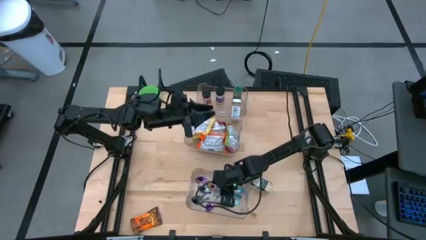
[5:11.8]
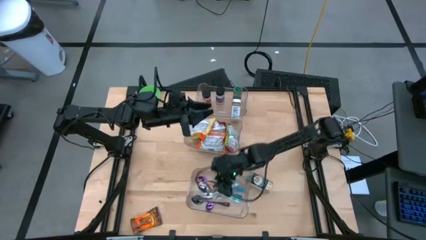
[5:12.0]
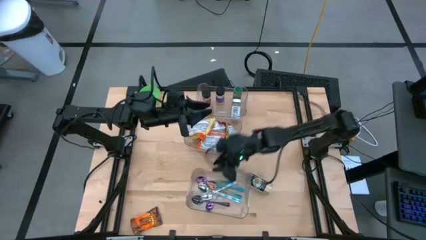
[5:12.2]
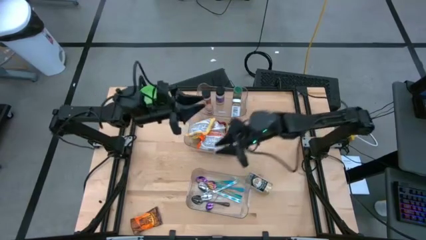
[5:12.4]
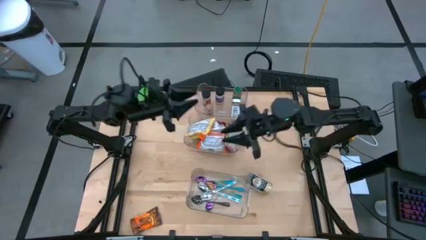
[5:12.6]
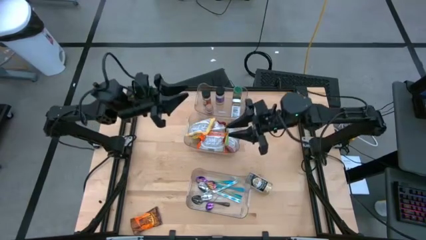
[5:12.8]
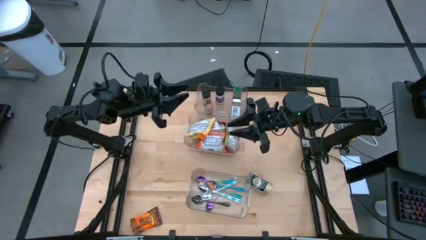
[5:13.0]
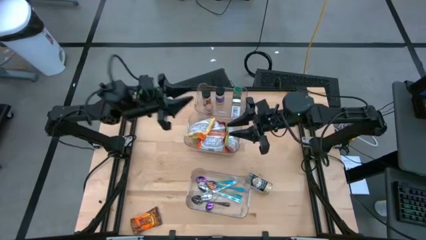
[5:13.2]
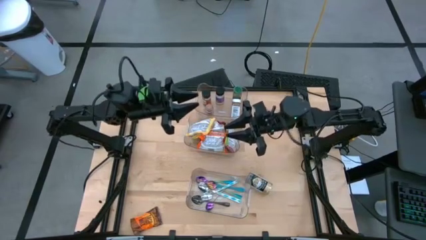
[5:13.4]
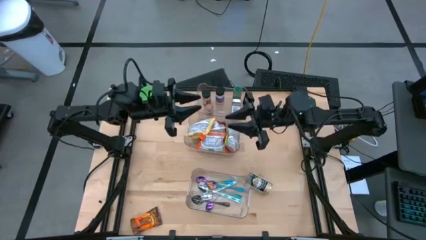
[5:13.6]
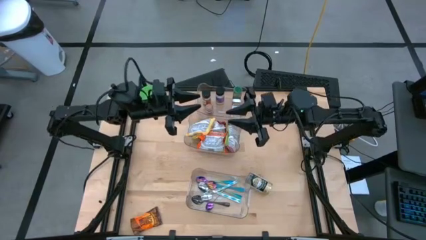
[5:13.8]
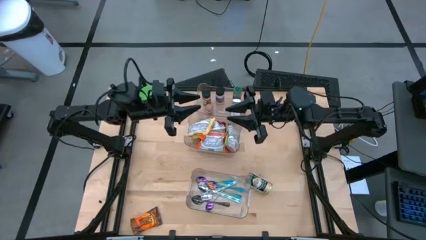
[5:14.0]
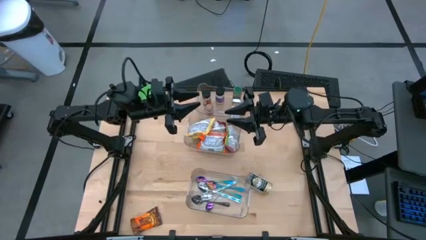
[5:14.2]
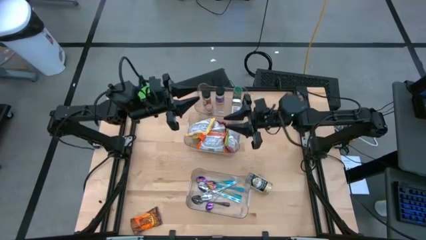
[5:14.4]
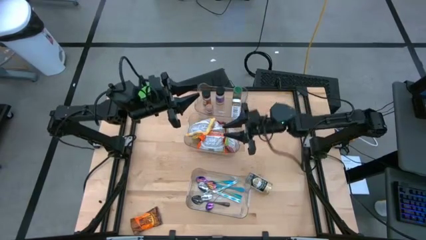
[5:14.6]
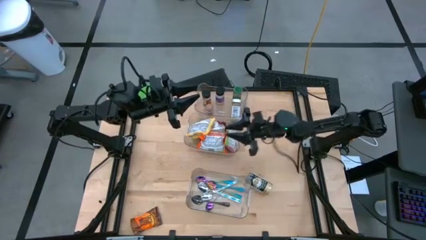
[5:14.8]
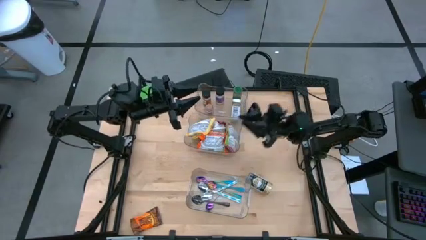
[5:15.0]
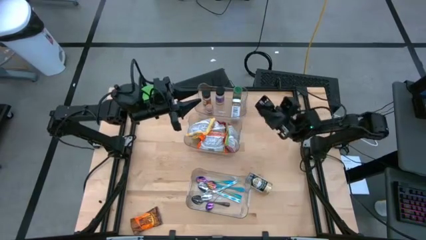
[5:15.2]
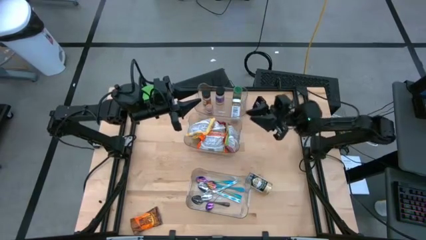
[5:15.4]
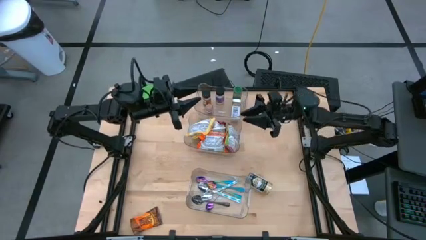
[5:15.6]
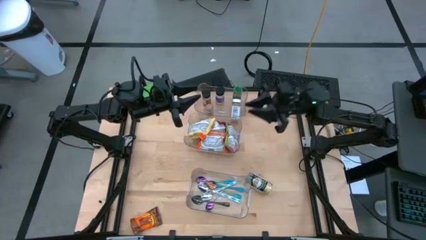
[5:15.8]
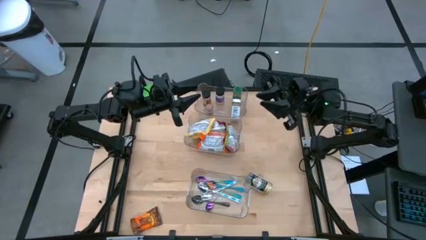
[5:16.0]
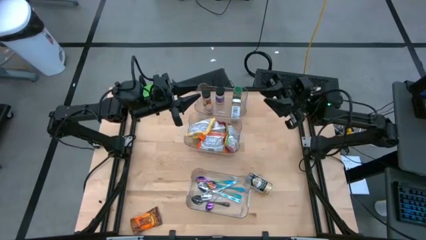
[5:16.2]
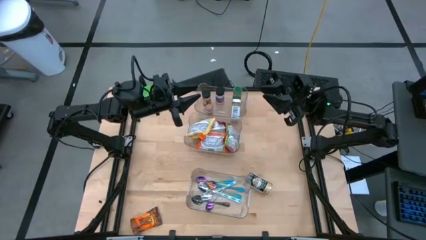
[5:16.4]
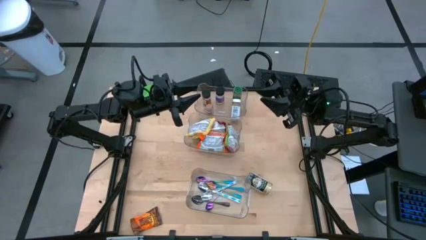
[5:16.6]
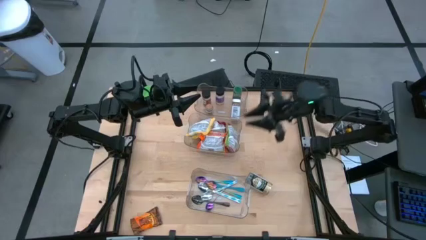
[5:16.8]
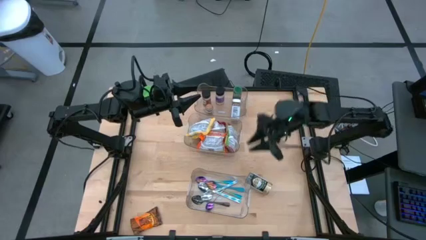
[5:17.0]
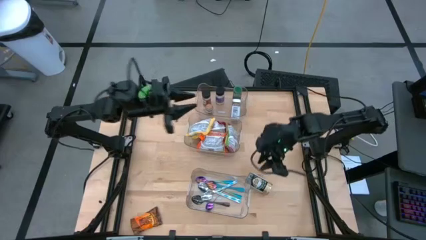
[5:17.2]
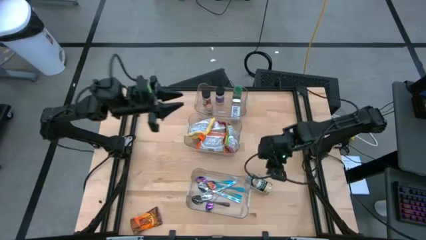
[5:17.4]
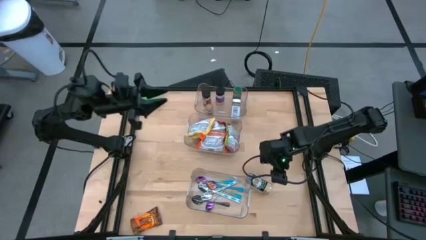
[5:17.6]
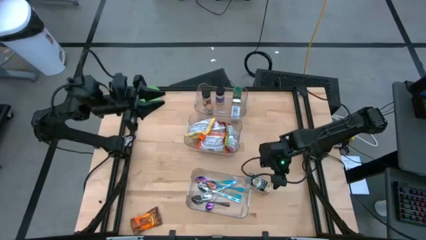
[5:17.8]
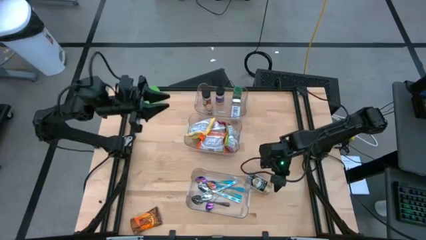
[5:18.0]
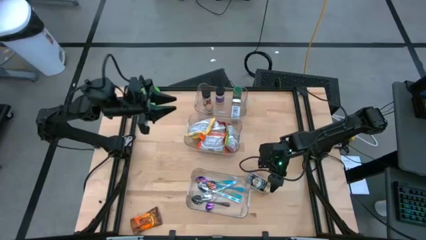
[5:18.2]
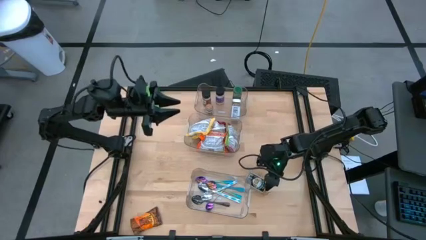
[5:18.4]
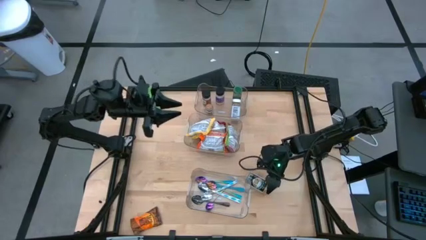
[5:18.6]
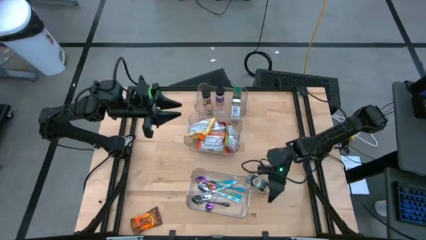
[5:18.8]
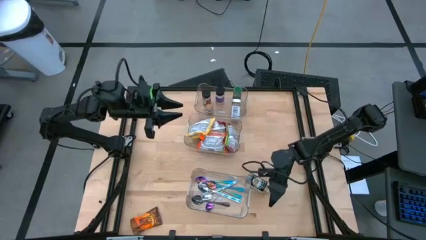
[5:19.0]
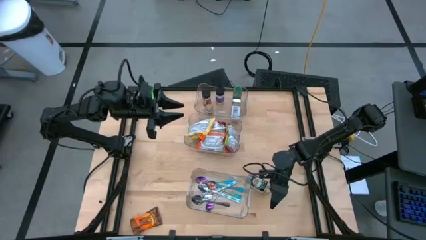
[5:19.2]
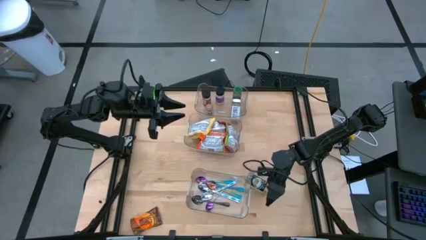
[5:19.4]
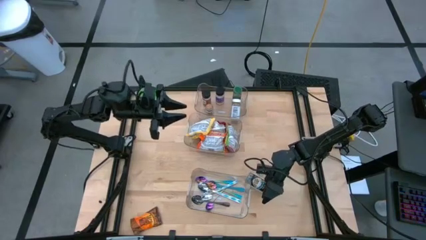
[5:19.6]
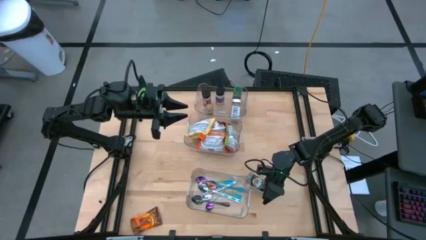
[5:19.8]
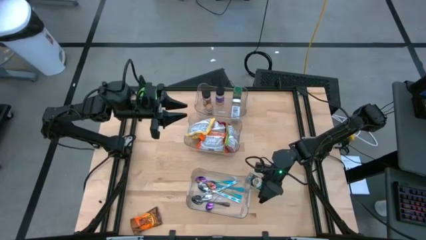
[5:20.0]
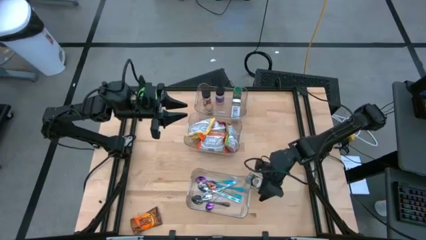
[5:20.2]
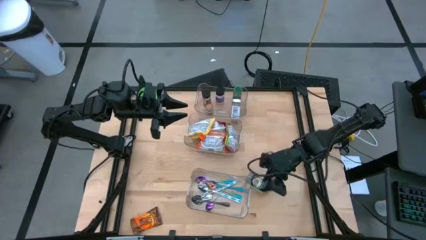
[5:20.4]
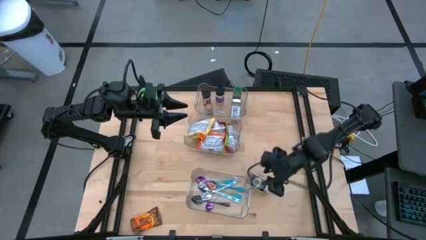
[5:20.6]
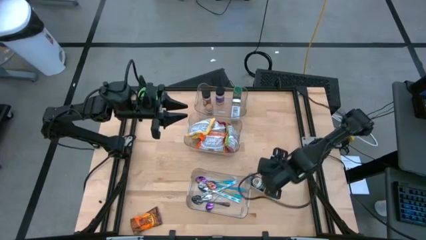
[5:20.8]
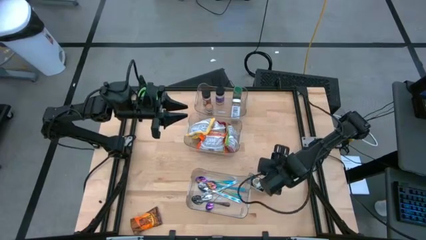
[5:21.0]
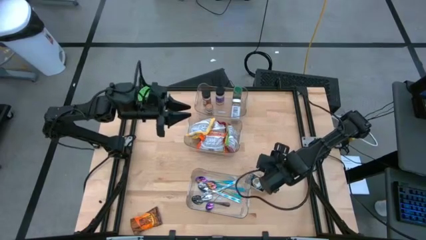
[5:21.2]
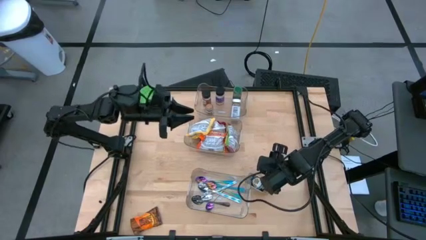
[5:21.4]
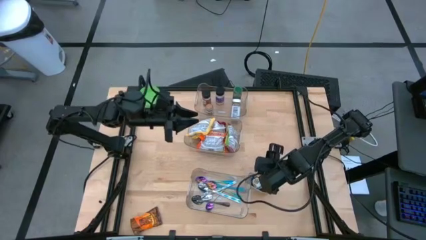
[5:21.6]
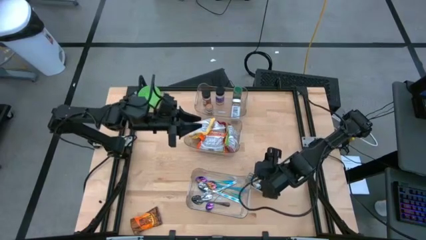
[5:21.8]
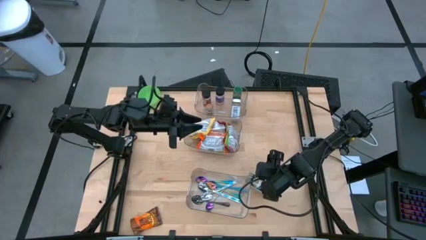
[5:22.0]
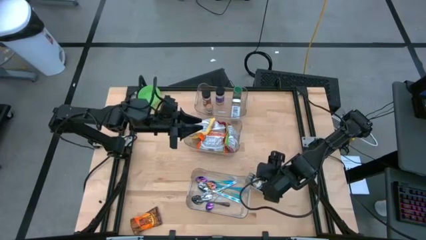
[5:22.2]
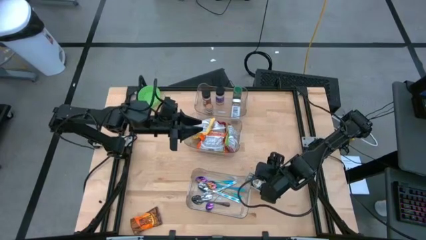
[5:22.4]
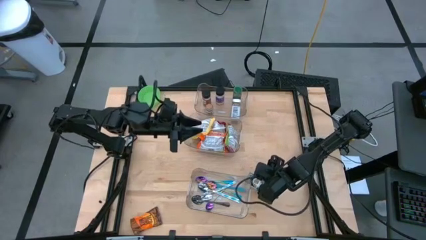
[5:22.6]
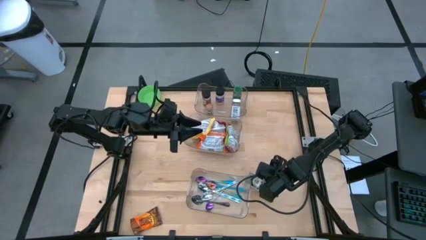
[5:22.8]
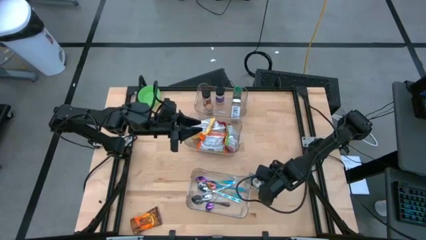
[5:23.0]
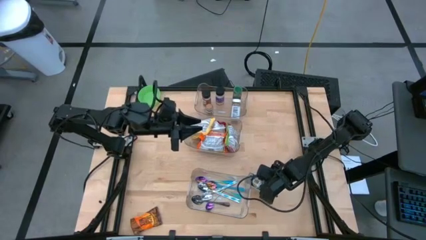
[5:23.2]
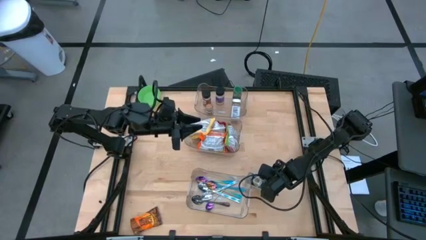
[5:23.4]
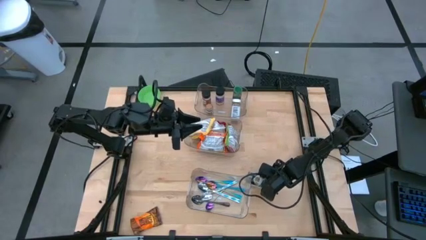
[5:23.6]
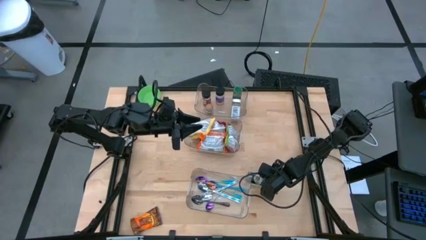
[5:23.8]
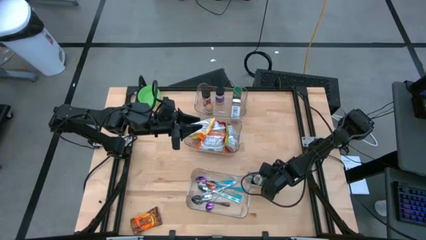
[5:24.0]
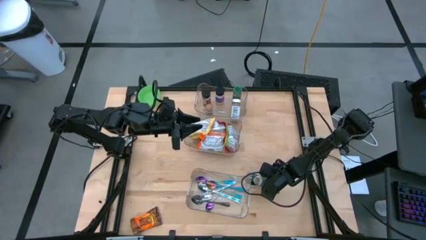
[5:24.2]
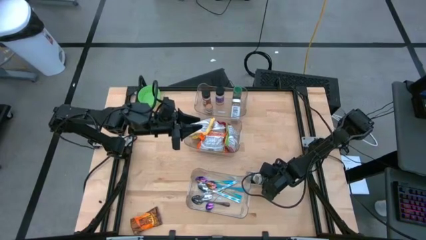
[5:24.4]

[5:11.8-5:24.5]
Task: Pick & Place Food Item
Put the gold seasoning bottle into the top transparent bin
